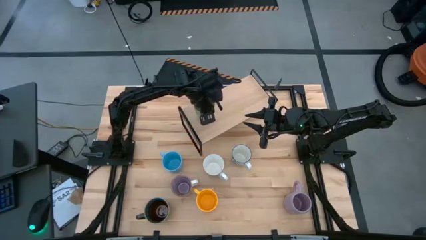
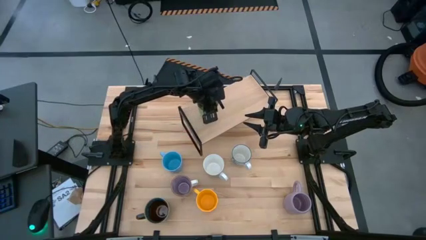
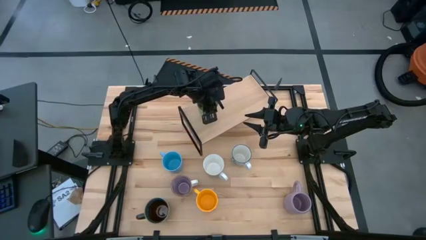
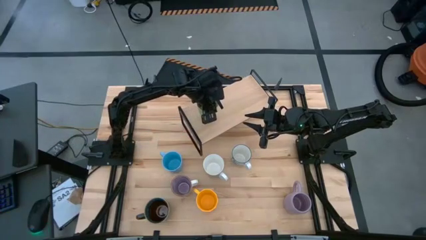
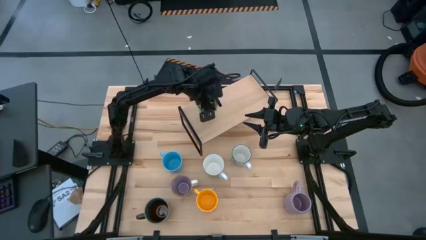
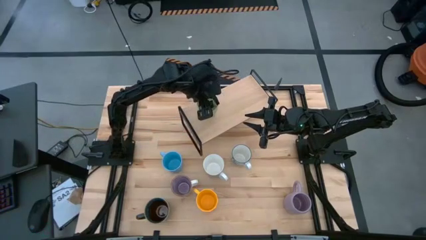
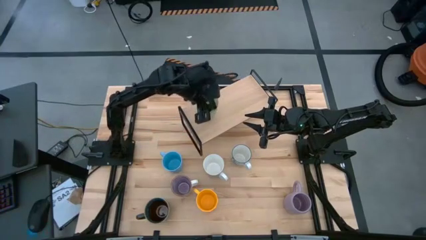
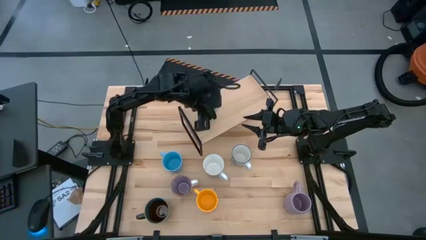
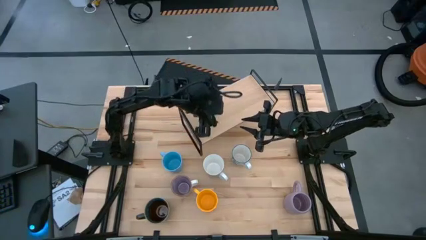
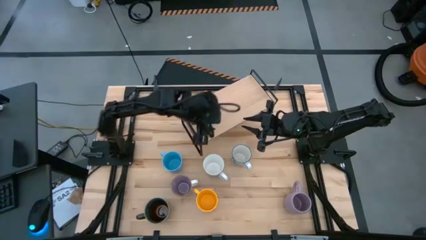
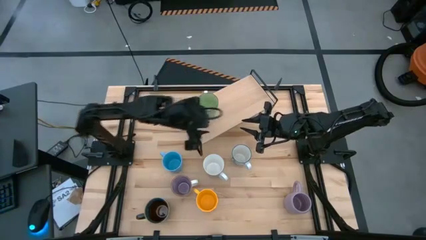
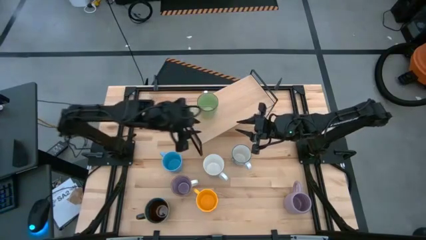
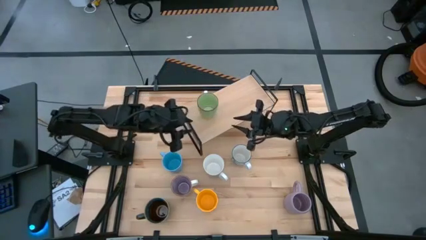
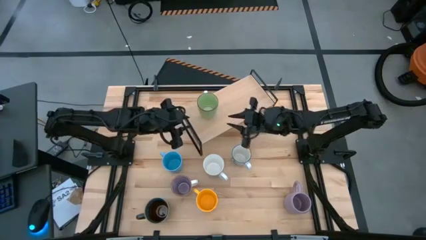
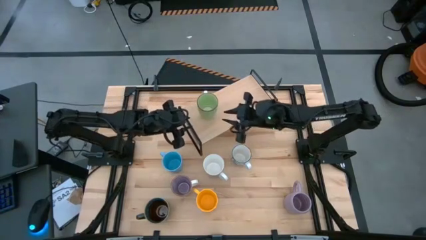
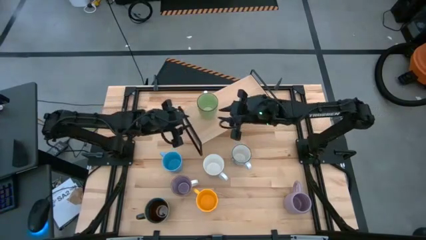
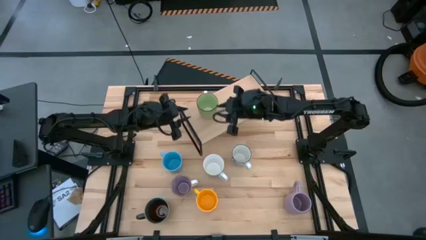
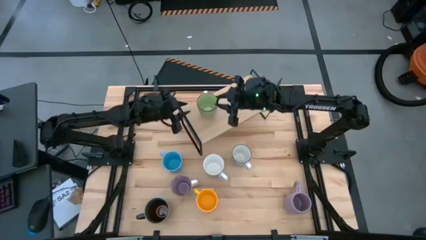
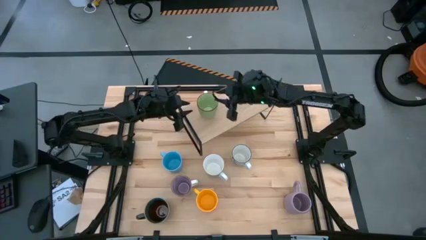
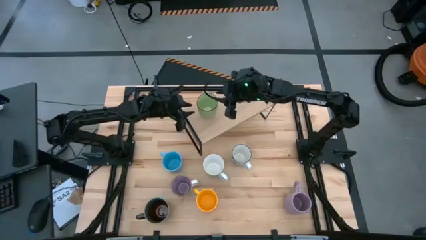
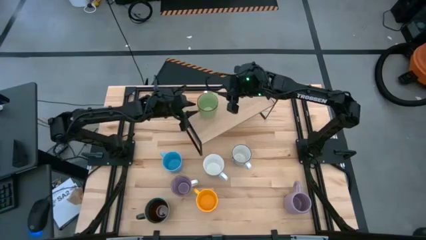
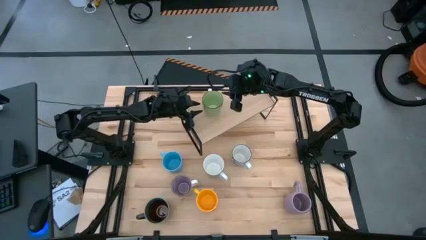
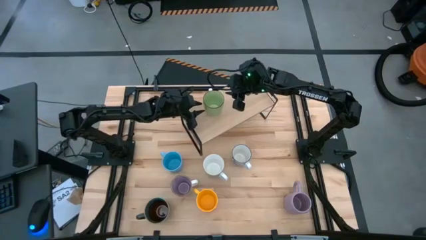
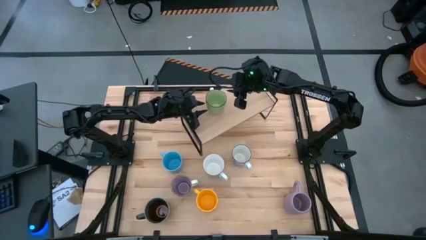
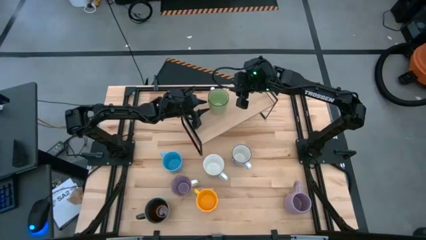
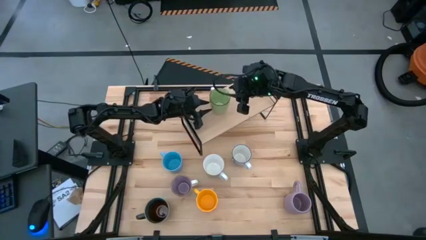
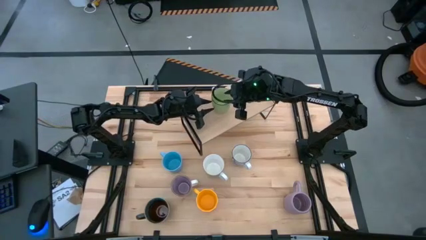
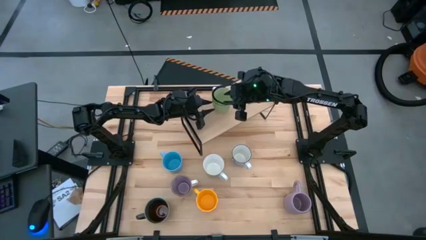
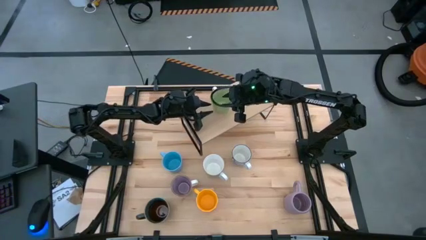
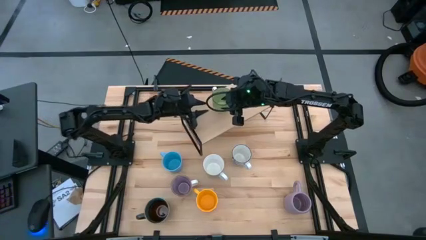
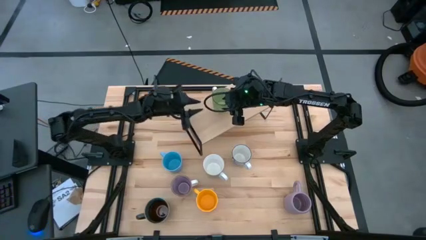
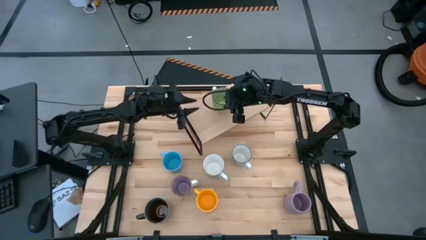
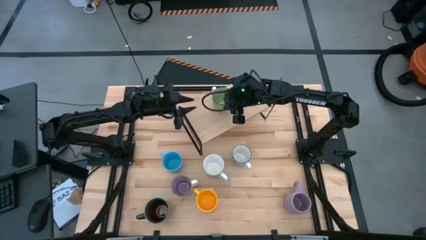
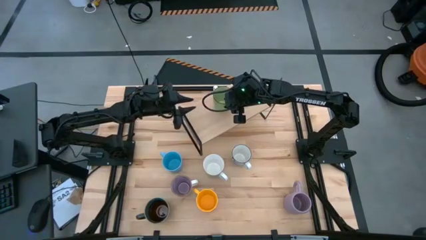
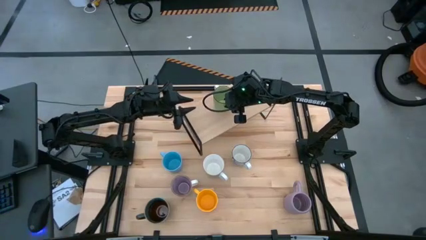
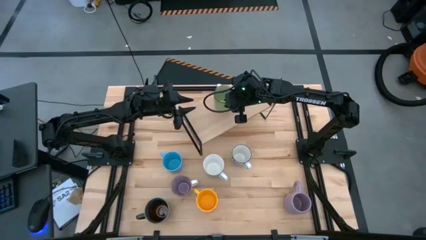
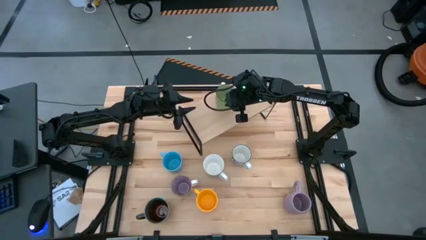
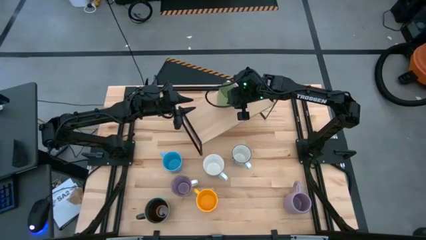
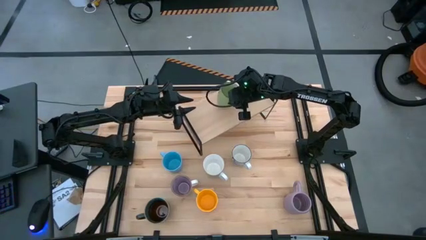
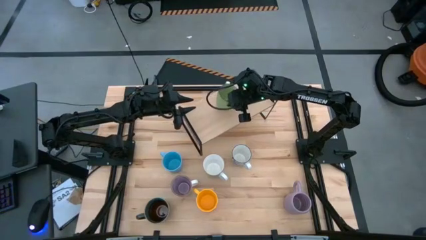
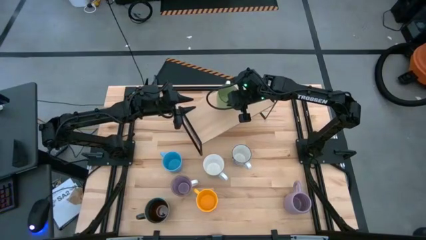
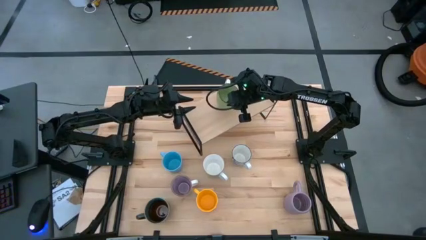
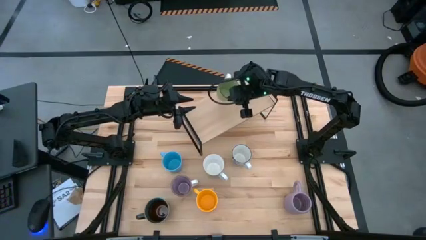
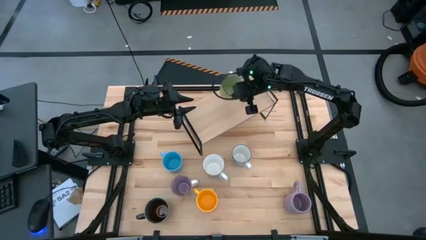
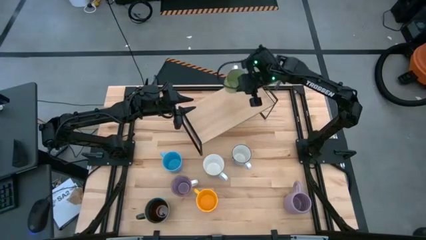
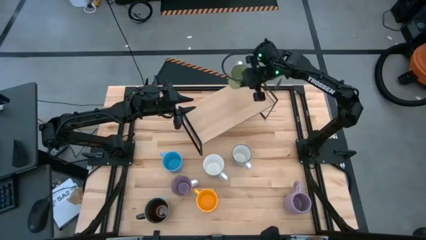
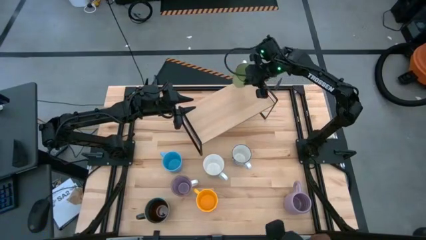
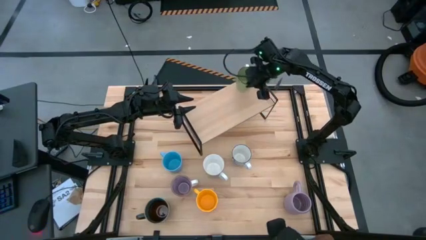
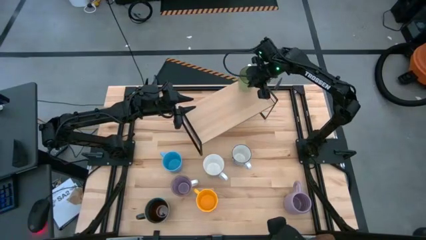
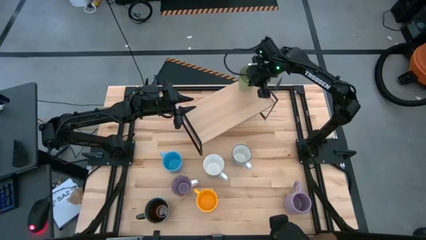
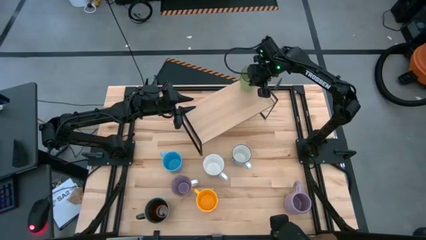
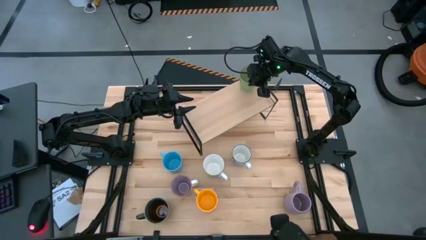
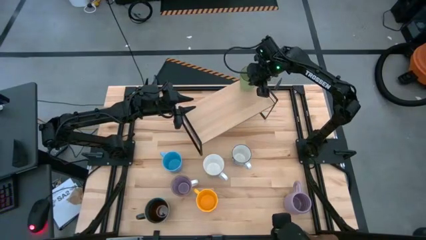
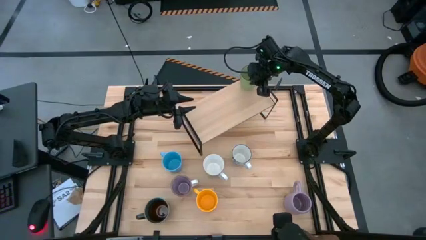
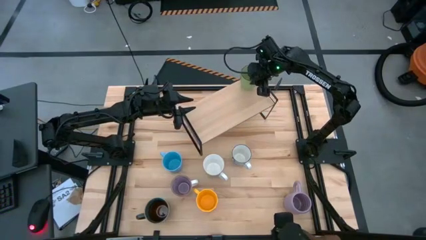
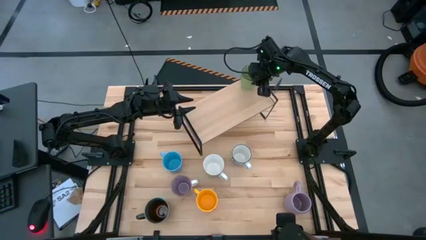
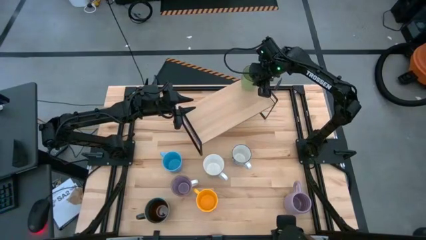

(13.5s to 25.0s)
Task: Place coffee mugs
Put the green mug on the shelf
